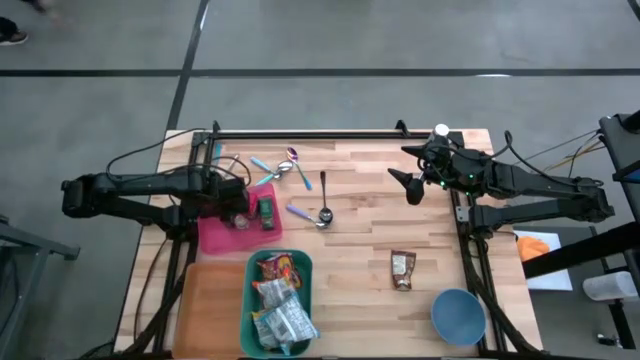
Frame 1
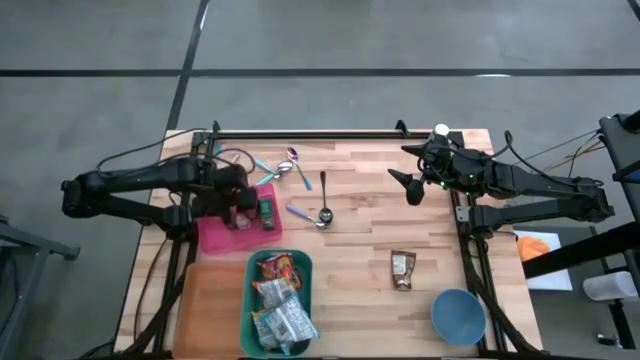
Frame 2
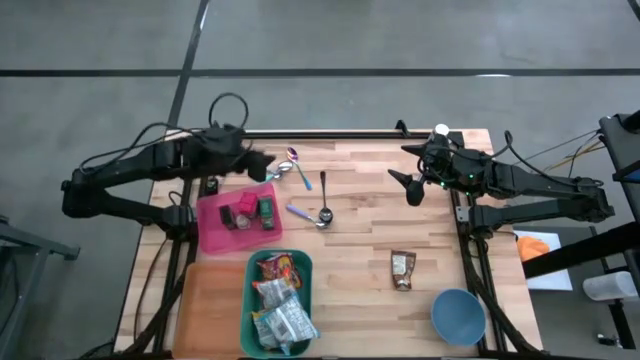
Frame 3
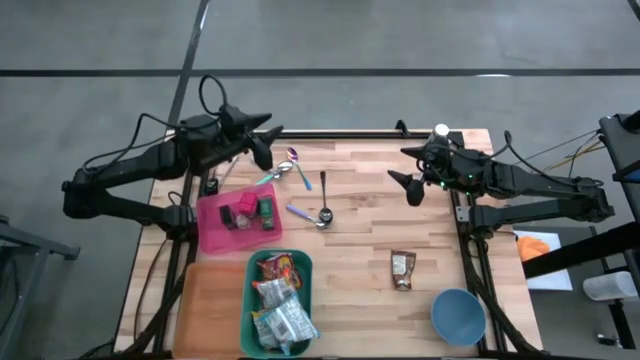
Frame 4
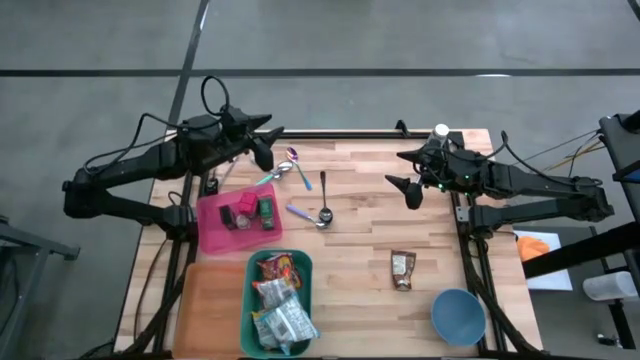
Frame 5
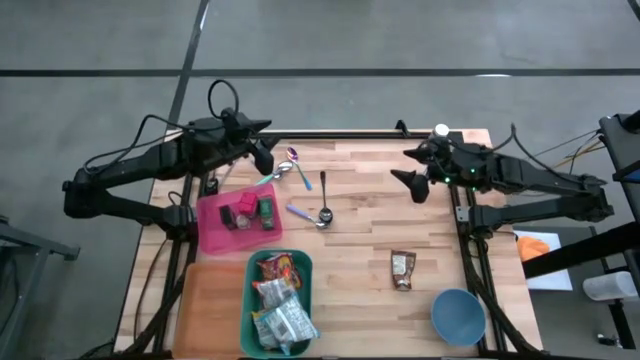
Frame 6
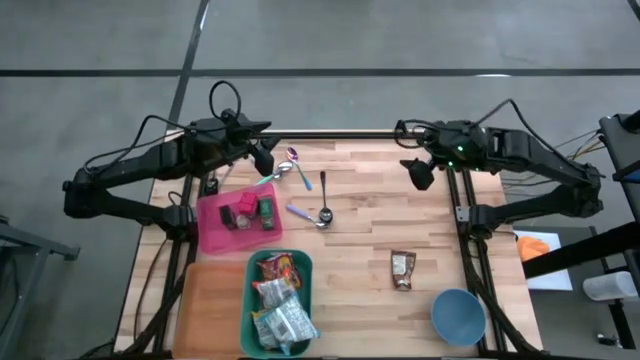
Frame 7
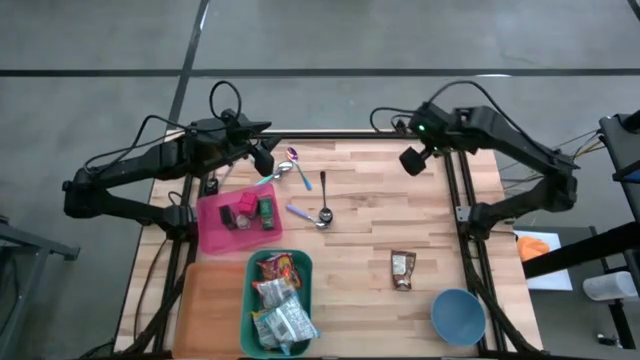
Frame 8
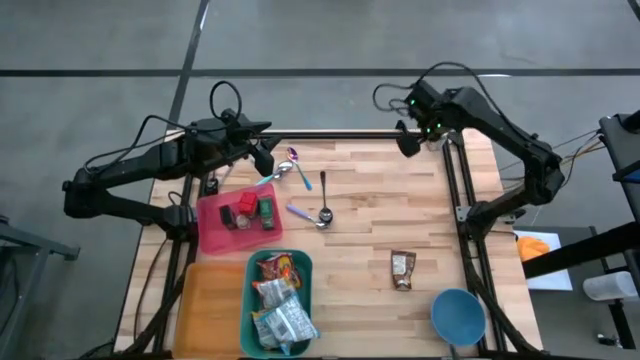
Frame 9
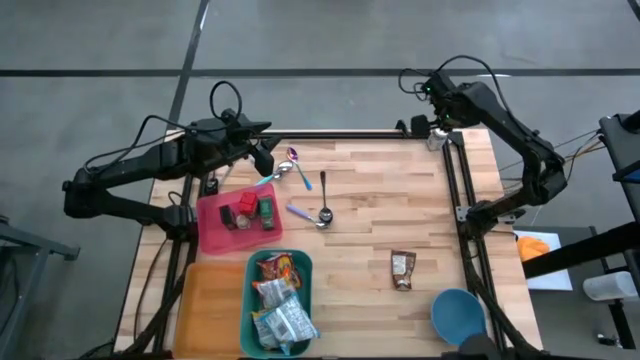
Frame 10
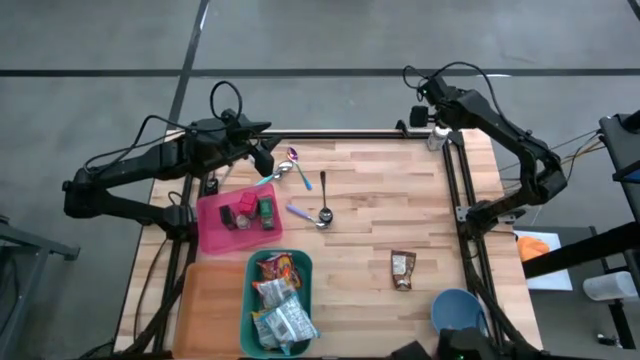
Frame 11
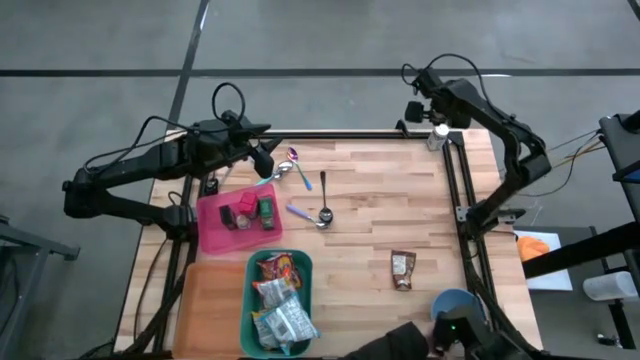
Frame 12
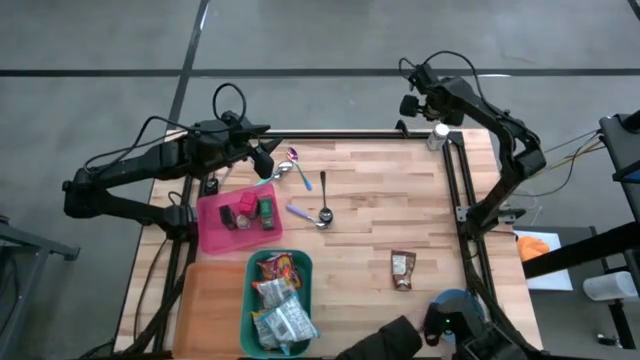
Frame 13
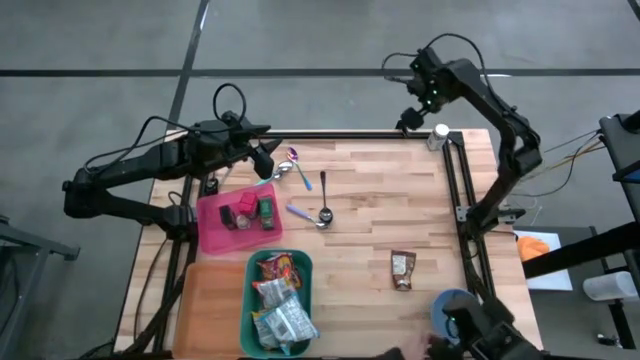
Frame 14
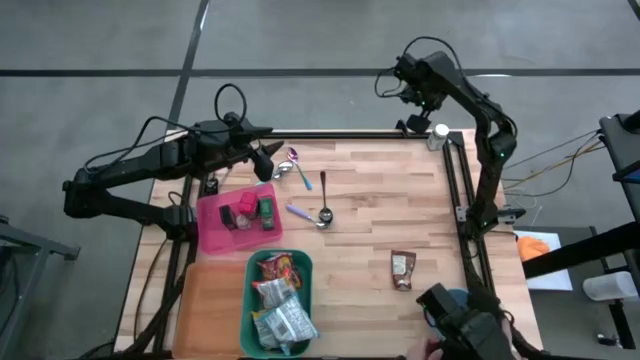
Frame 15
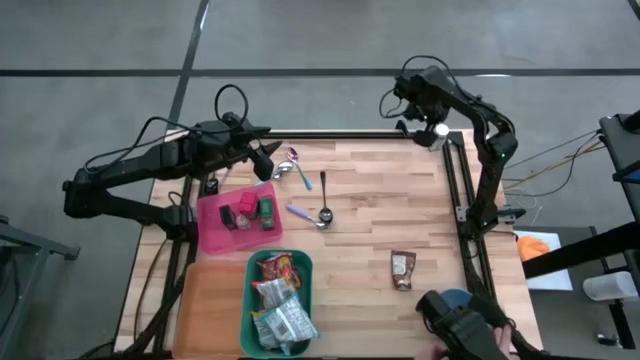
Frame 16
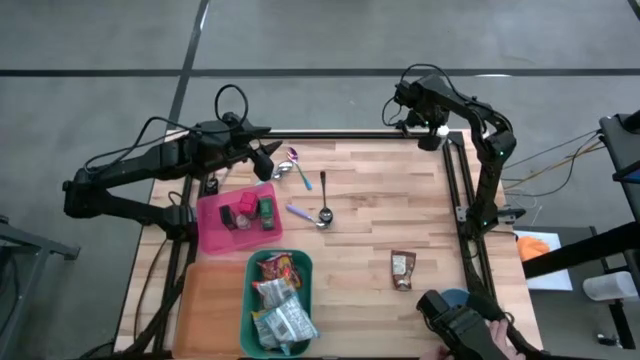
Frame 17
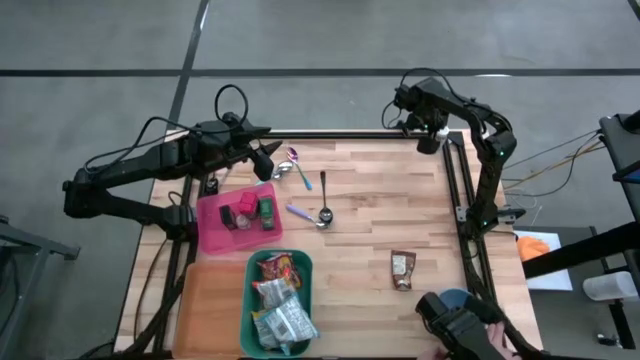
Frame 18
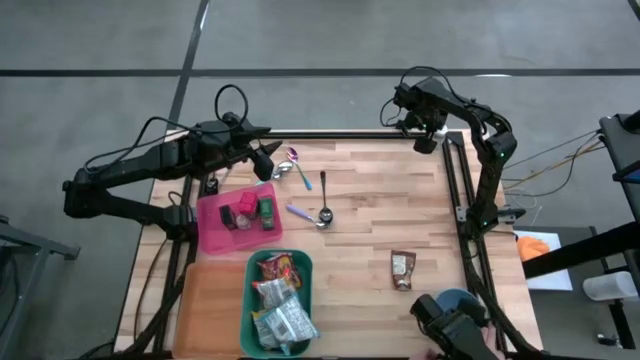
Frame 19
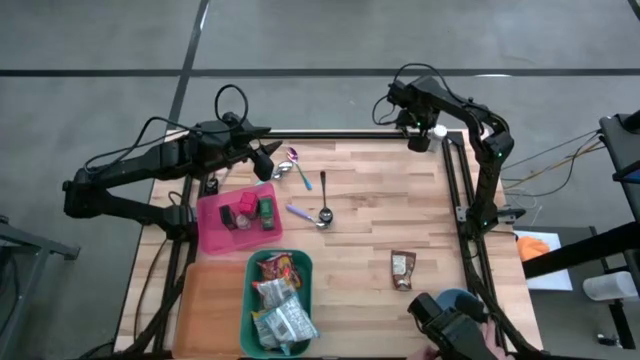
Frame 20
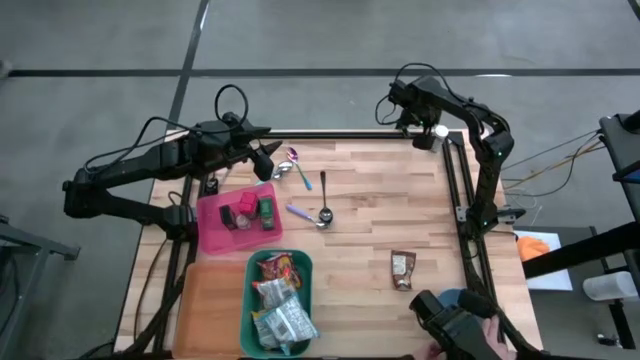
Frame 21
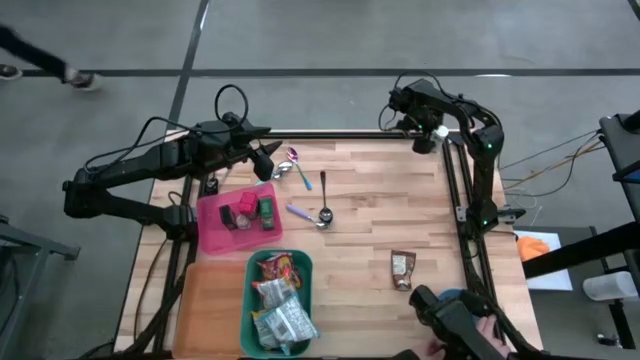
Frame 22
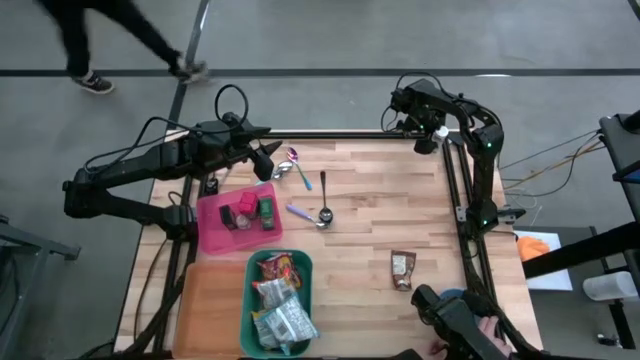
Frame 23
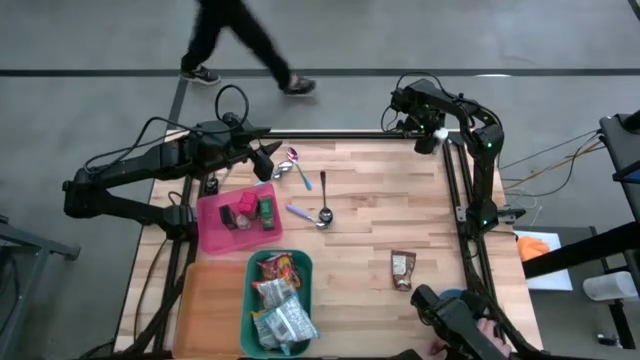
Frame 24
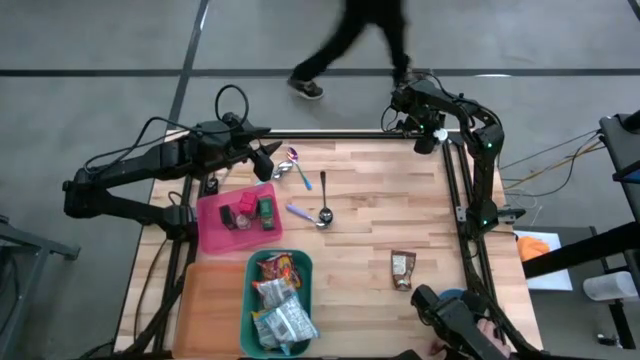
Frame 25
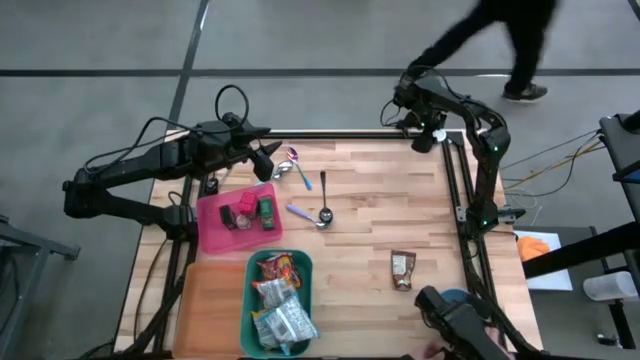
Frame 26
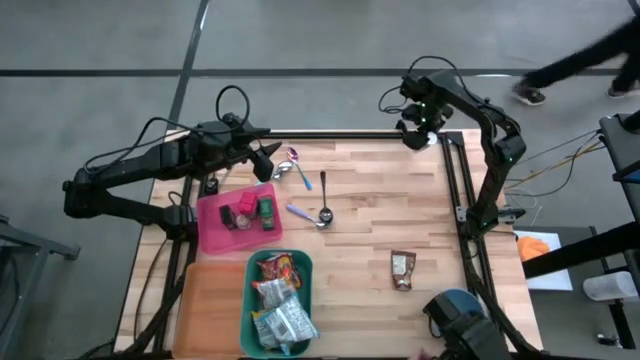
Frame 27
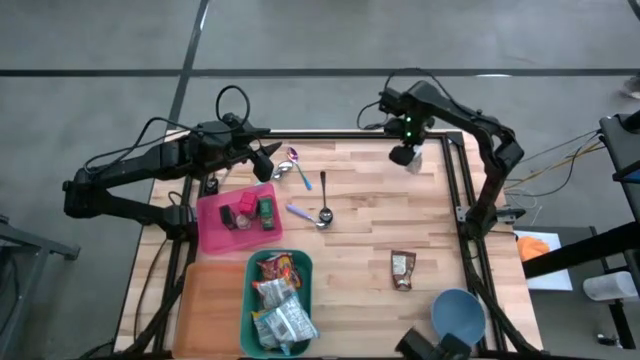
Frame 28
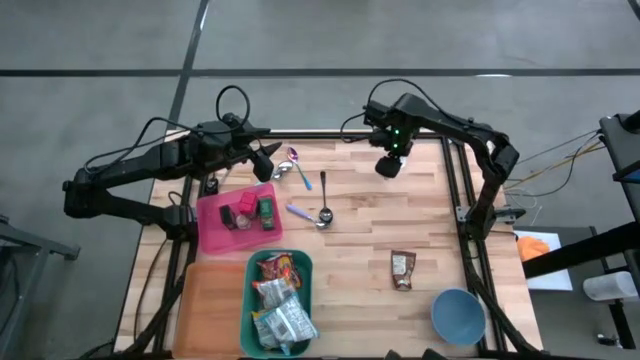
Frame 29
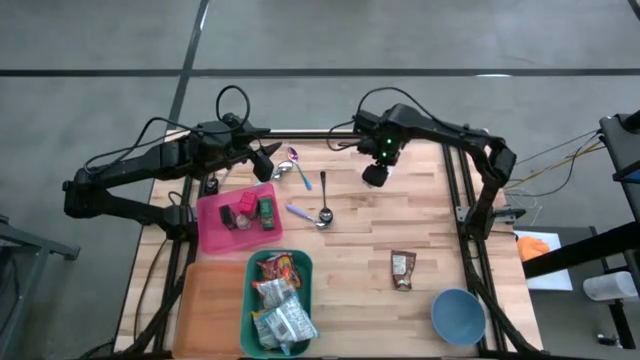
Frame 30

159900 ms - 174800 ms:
Put the white seasoning bottle into the pink bin
